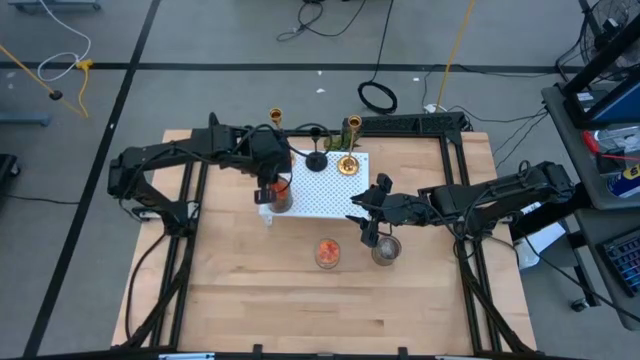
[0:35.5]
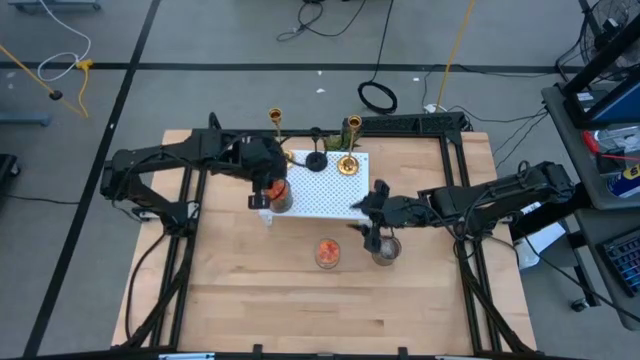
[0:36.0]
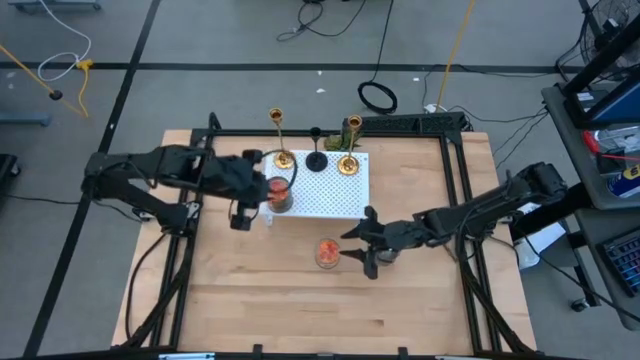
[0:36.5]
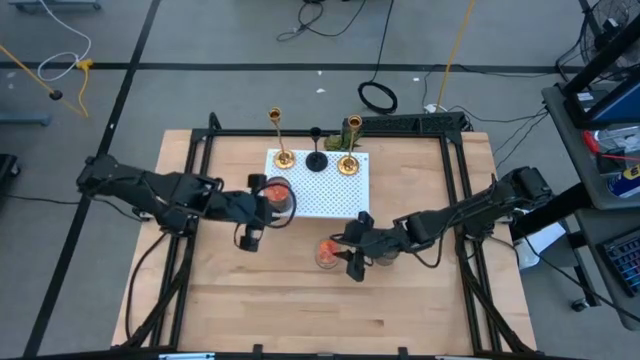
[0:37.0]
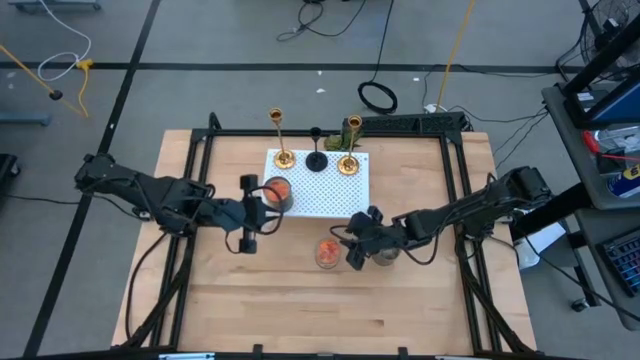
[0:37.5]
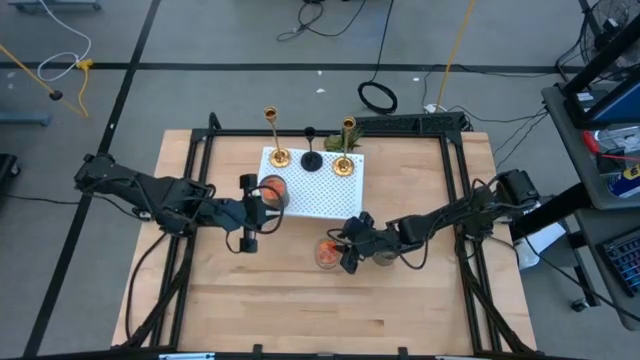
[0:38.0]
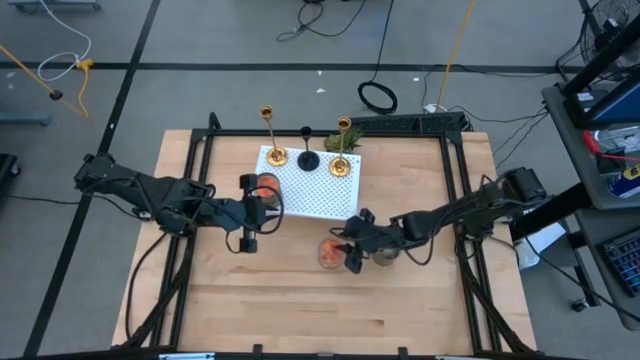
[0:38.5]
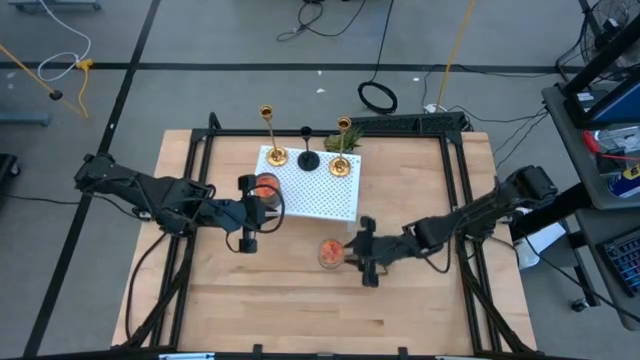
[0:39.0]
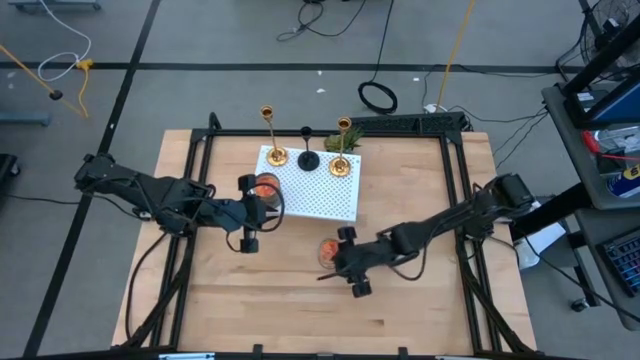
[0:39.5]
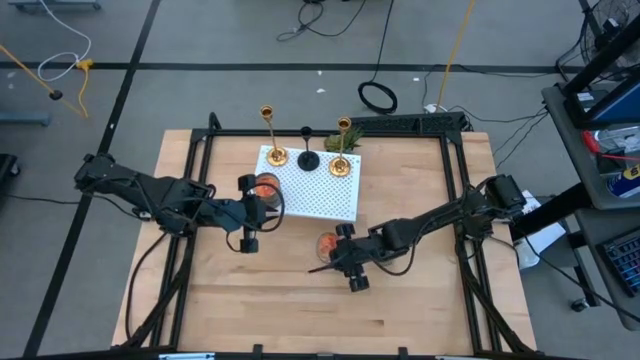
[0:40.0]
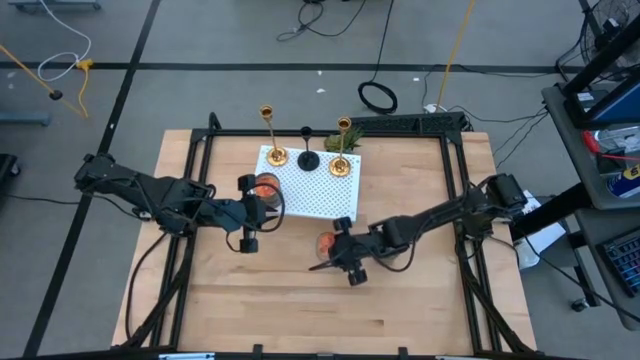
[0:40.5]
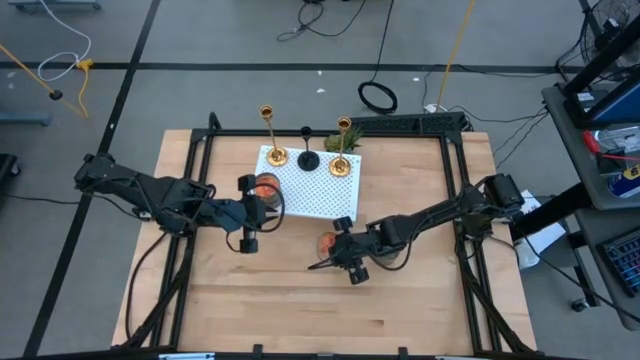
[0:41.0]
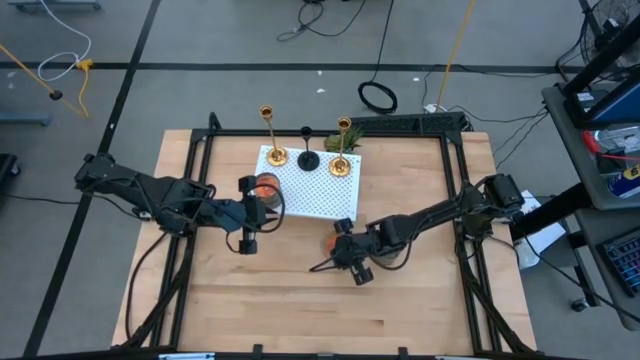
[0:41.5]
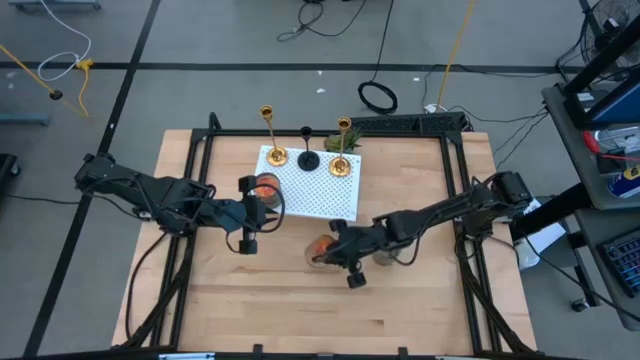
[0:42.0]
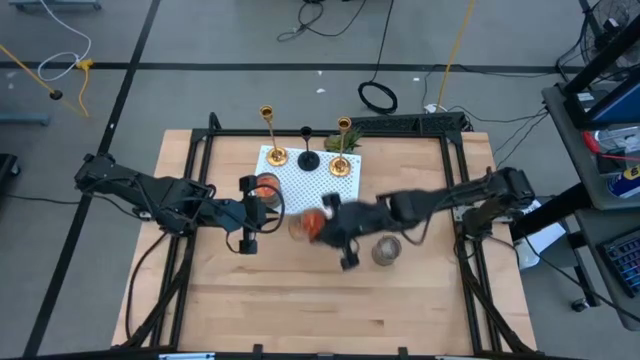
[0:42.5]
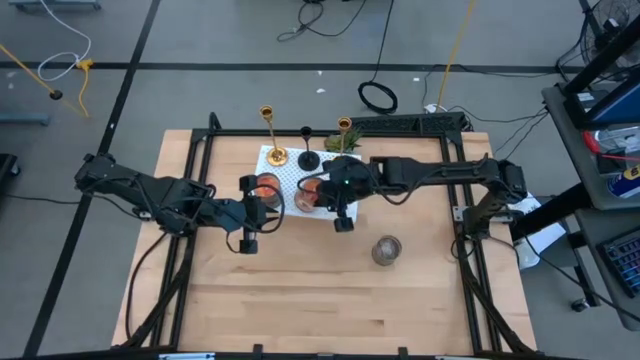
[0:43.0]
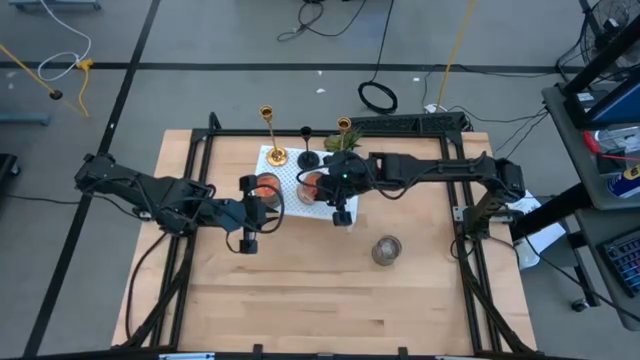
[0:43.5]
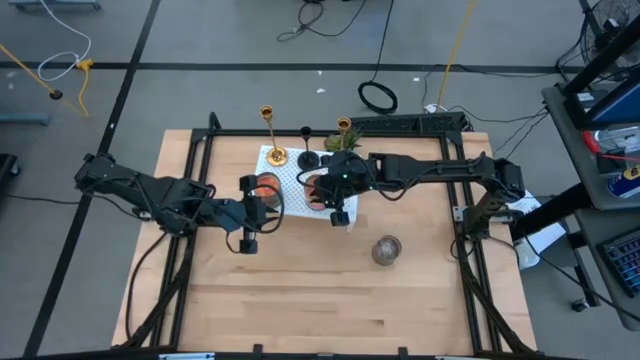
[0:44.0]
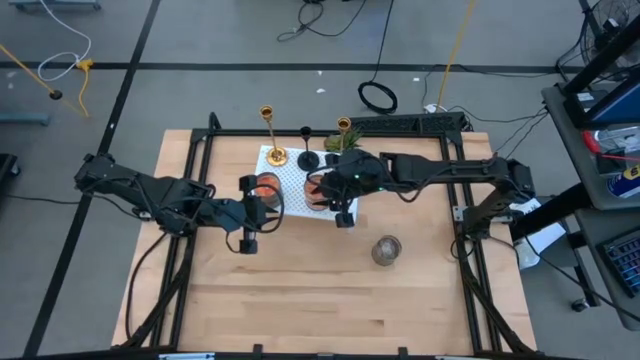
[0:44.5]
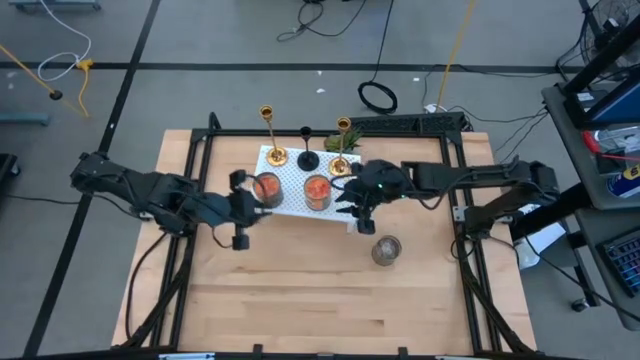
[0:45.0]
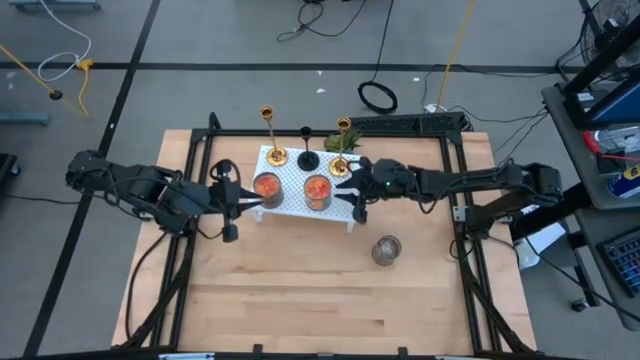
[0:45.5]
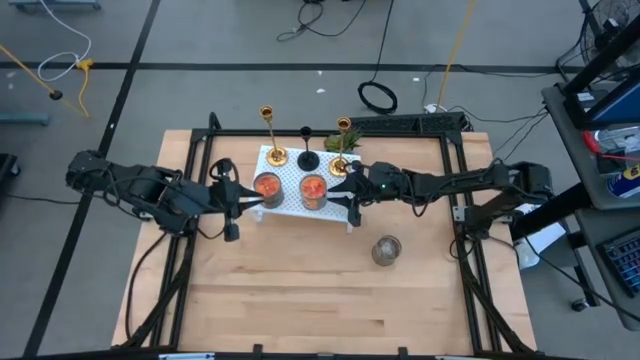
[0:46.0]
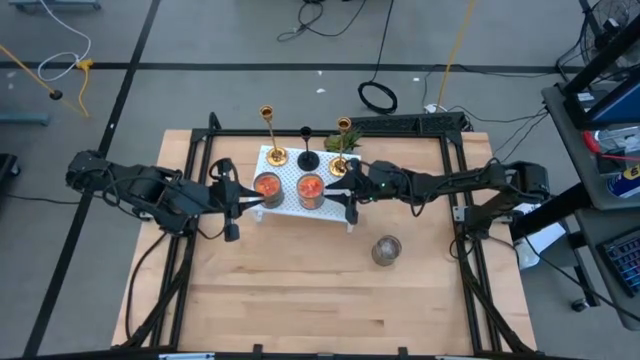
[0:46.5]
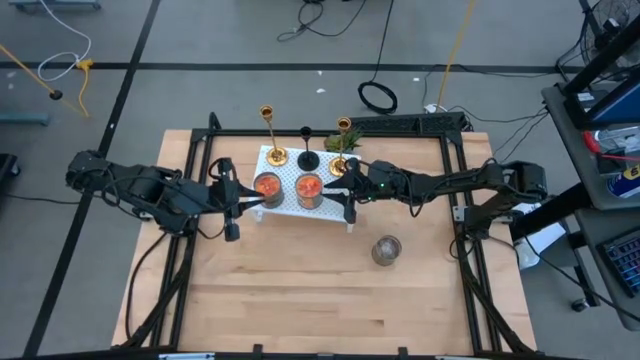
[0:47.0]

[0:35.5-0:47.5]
Task: Pick & Place candle stick holders
Put the left orange scented candle on the shelf

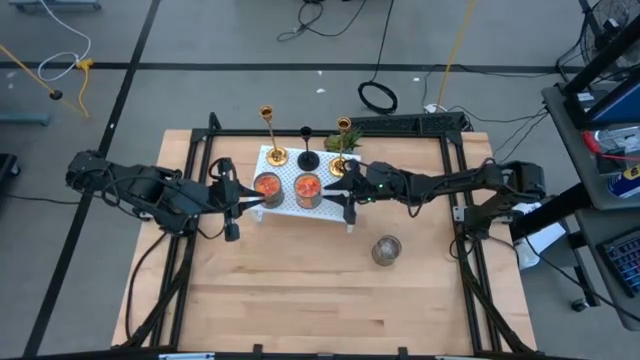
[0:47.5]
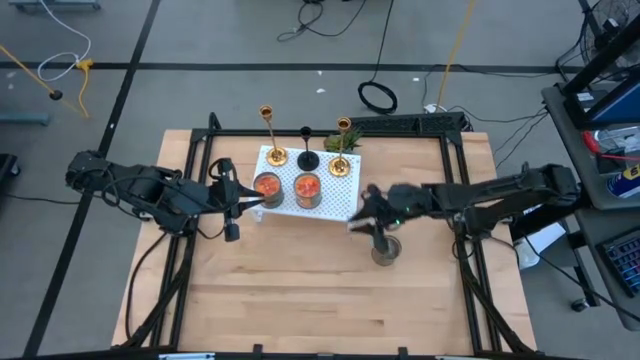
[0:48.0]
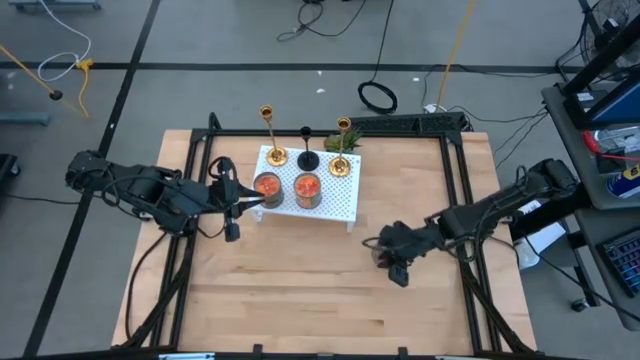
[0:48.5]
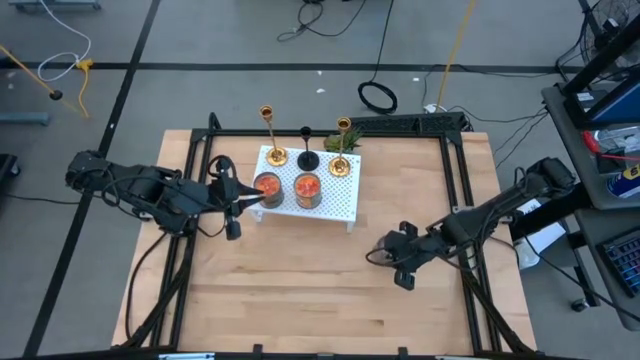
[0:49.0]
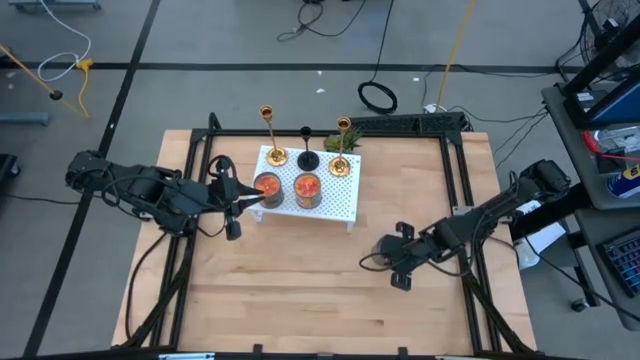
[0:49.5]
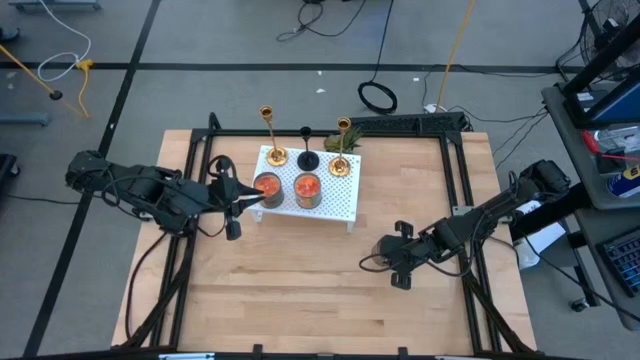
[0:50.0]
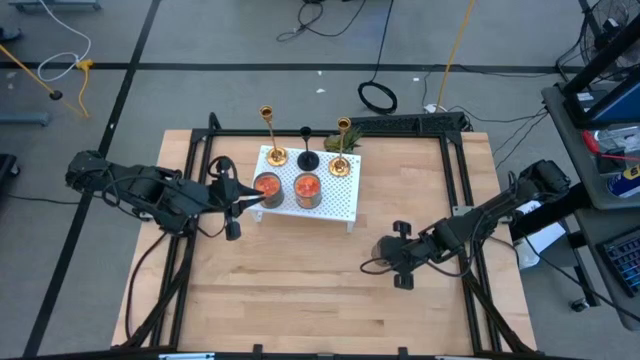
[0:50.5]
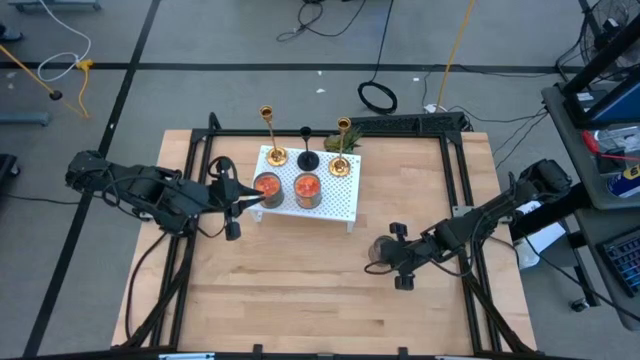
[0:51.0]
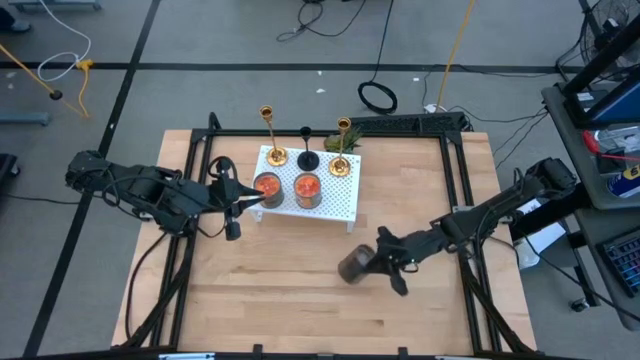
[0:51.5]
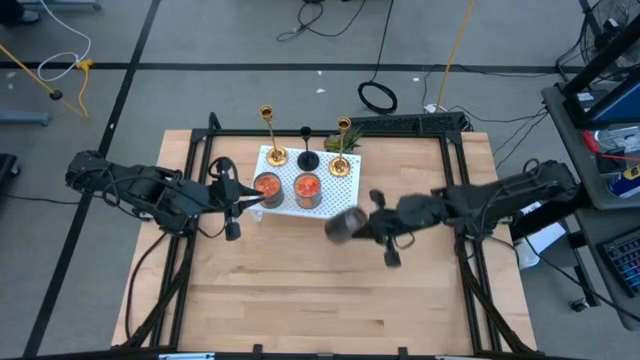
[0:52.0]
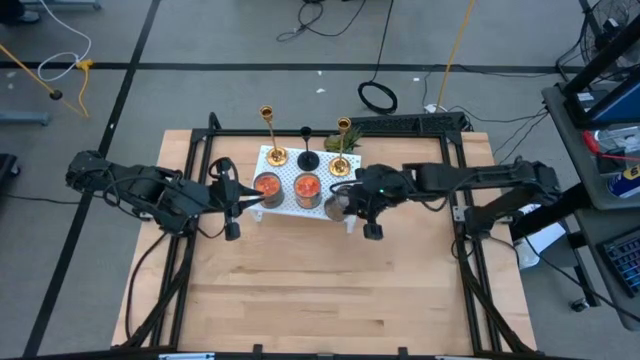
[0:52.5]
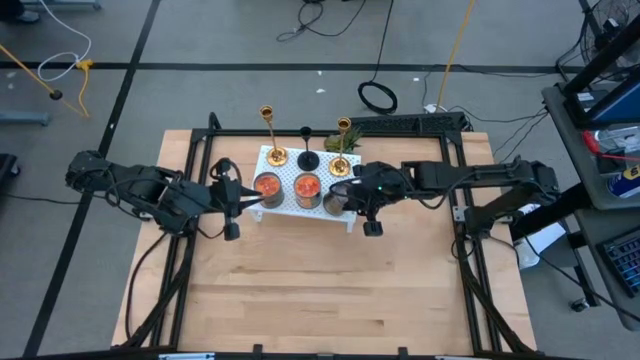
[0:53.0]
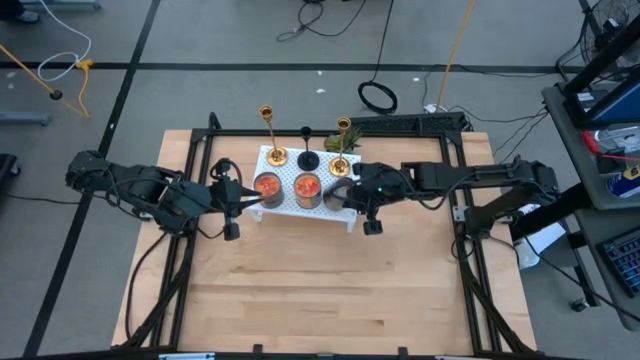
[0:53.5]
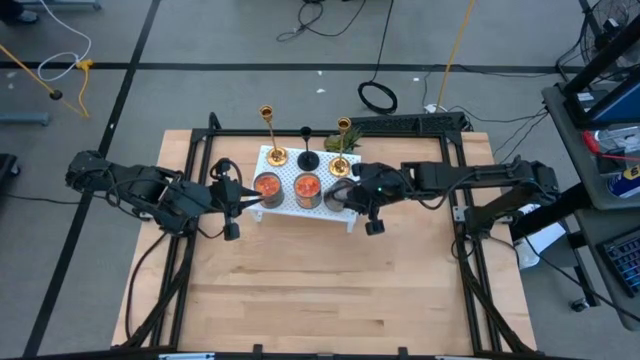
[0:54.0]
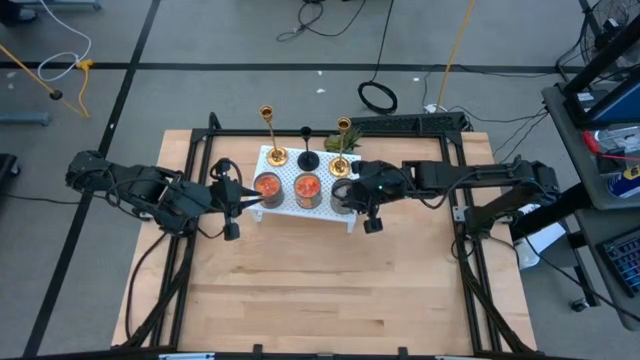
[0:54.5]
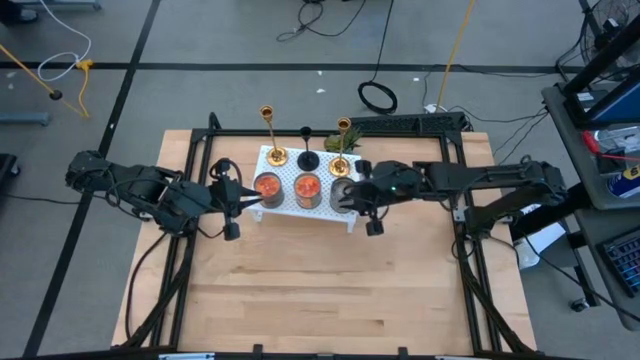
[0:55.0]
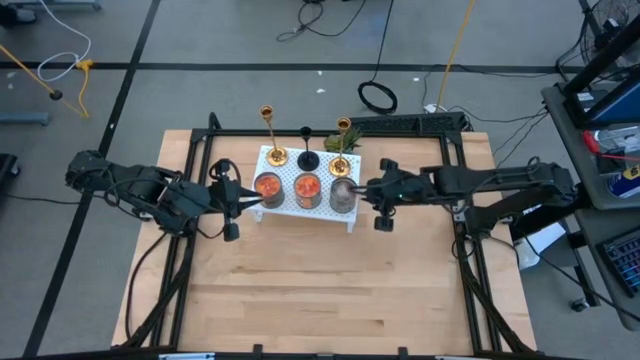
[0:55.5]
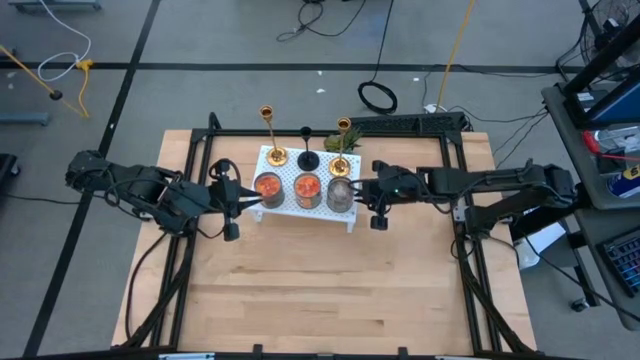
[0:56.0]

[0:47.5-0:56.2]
Put the orange scented candle on the shelf

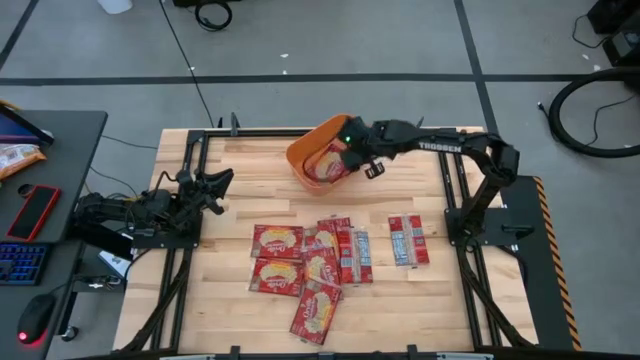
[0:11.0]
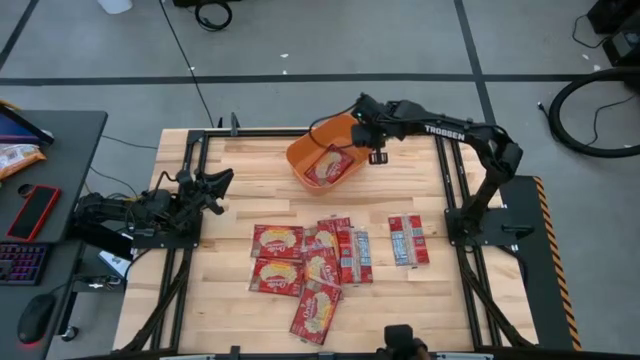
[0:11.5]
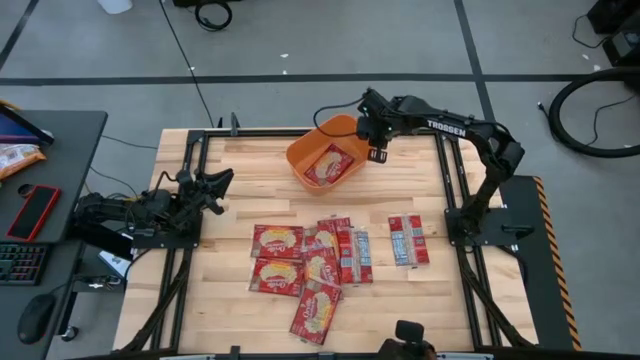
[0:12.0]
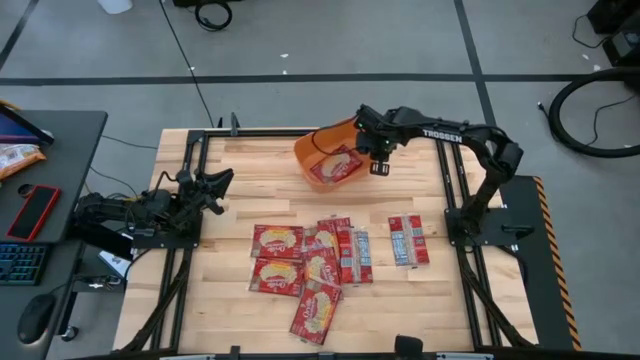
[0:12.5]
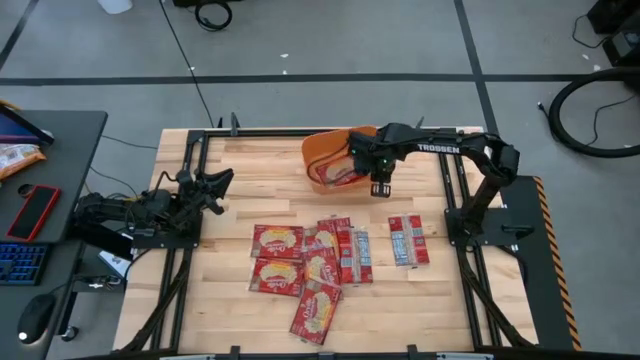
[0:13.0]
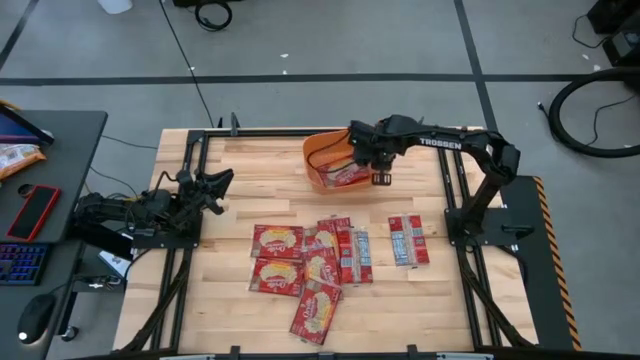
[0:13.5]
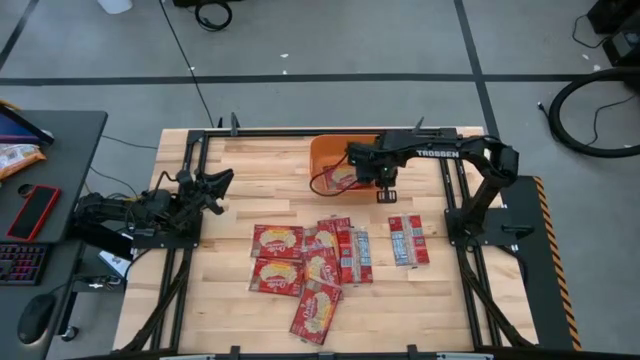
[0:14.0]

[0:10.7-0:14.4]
Task: Sort popcorn bags into baskets
Adjust the orange container
